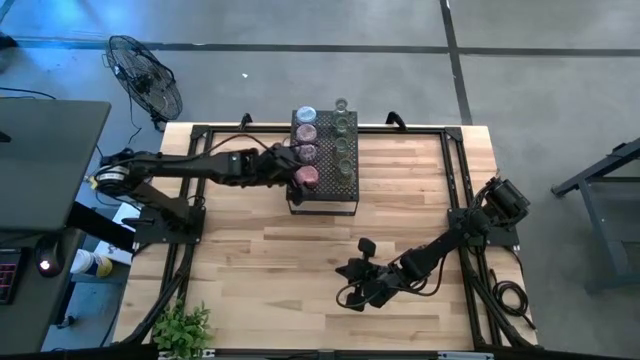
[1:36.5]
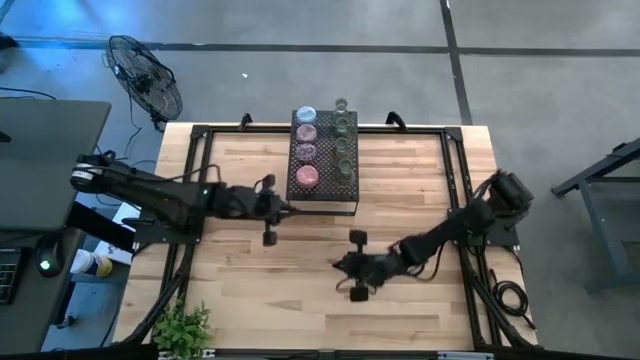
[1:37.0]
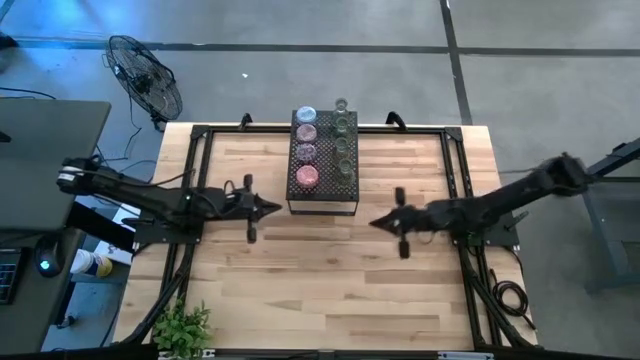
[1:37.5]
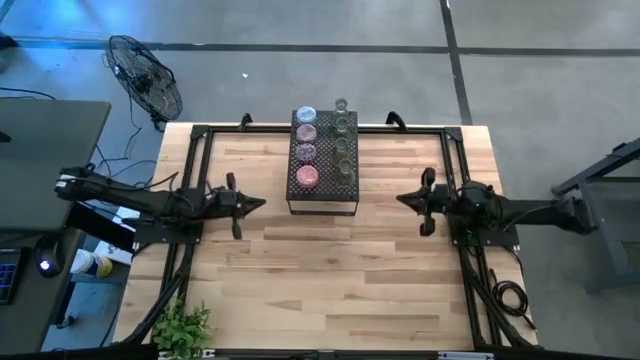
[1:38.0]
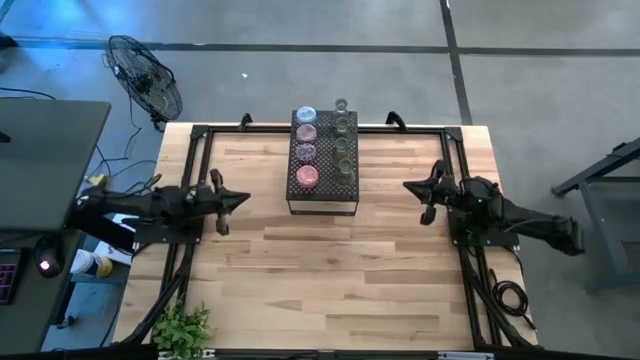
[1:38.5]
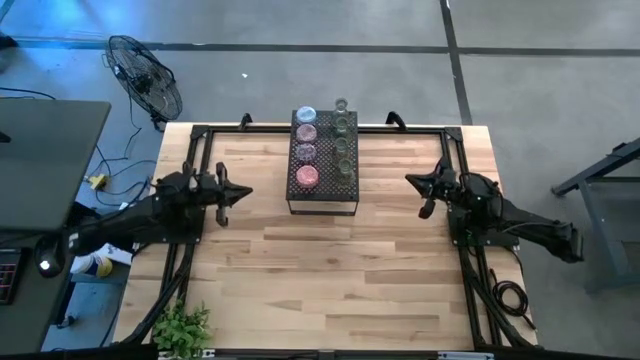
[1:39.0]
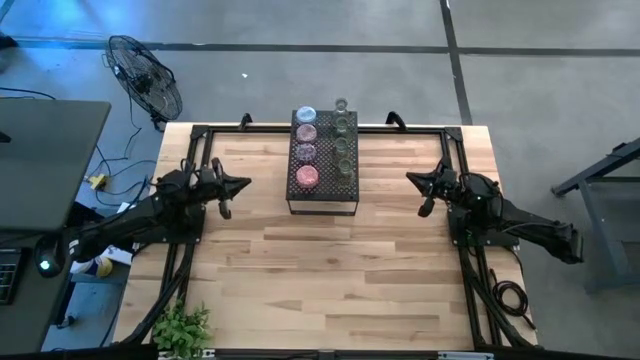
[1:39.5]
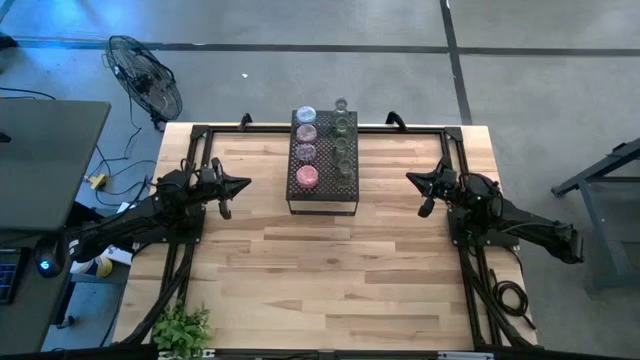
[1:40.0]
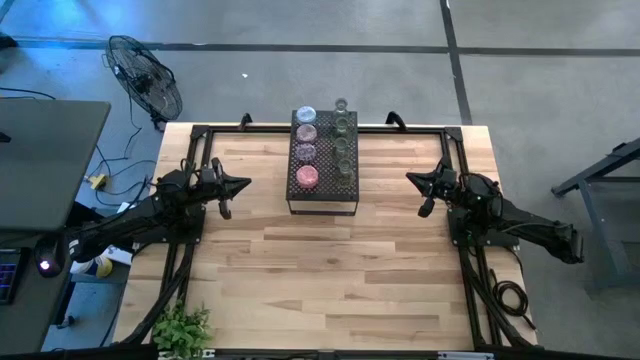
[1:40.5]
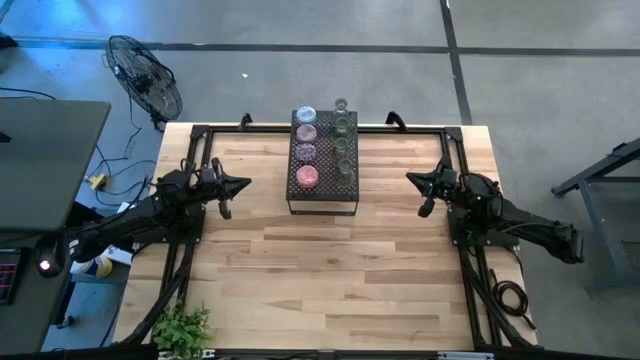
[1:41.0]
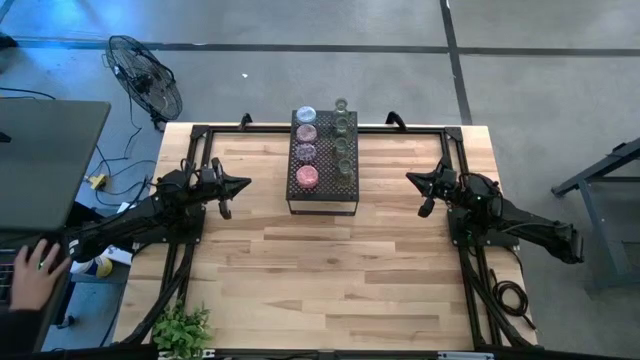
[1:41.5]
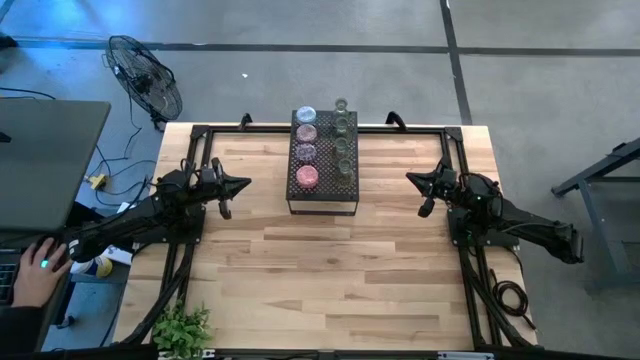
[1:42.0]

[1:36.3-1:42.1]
Task: Pick & Place candle stick holders
Return to Home Position

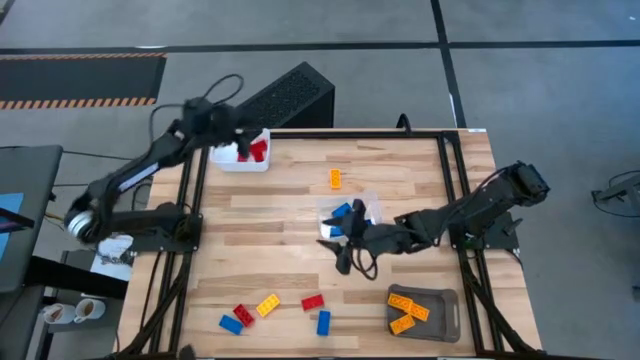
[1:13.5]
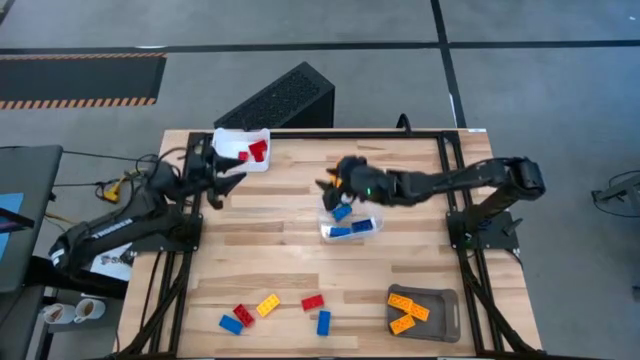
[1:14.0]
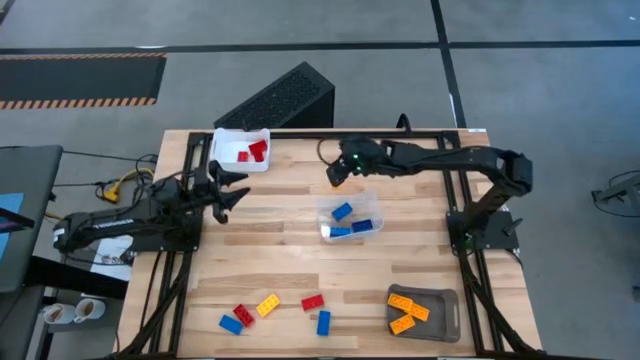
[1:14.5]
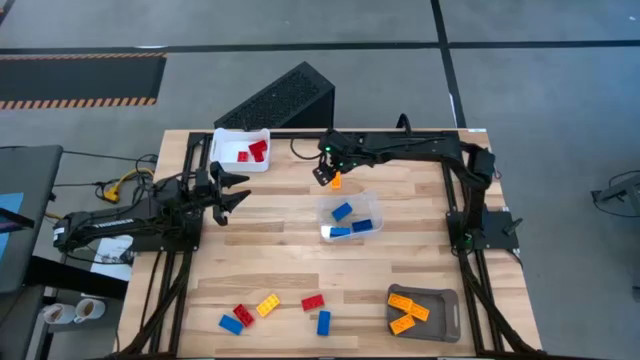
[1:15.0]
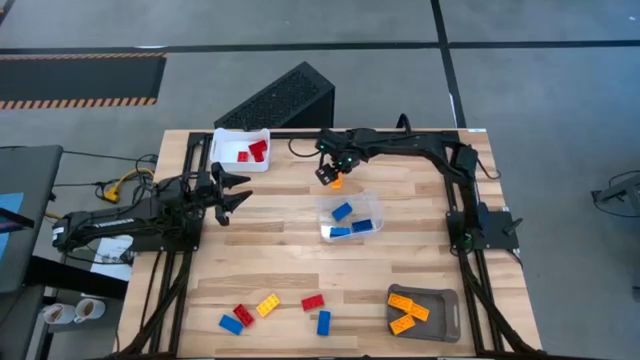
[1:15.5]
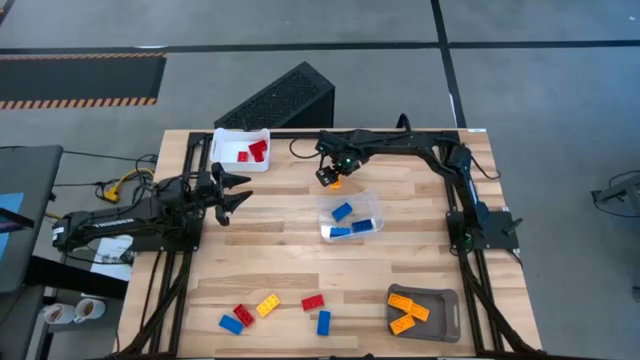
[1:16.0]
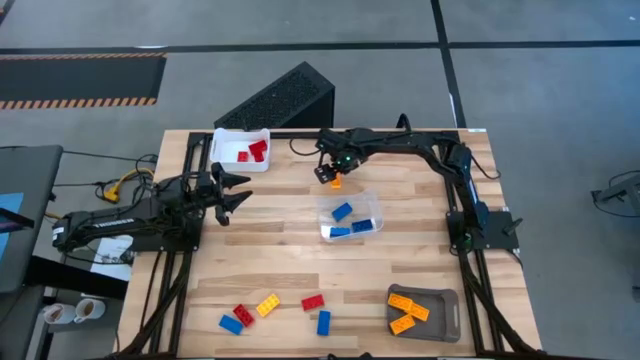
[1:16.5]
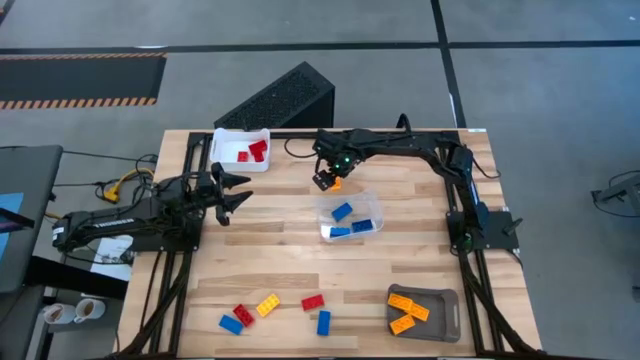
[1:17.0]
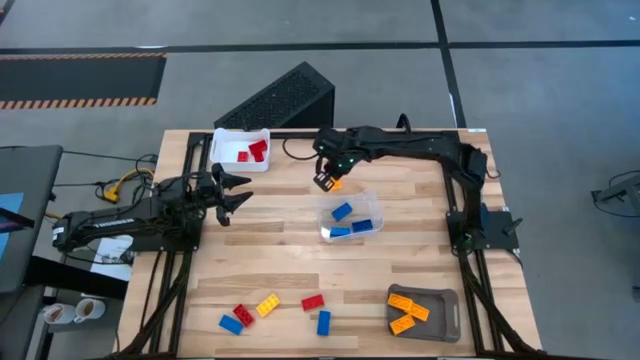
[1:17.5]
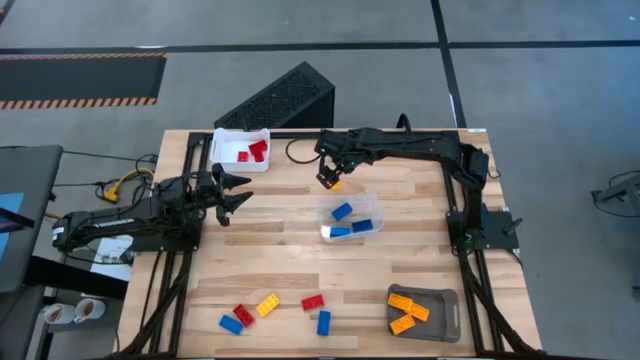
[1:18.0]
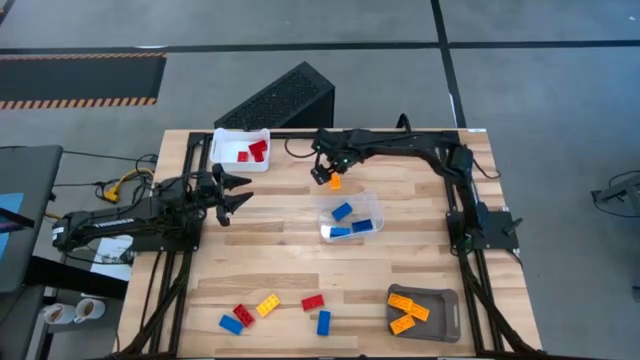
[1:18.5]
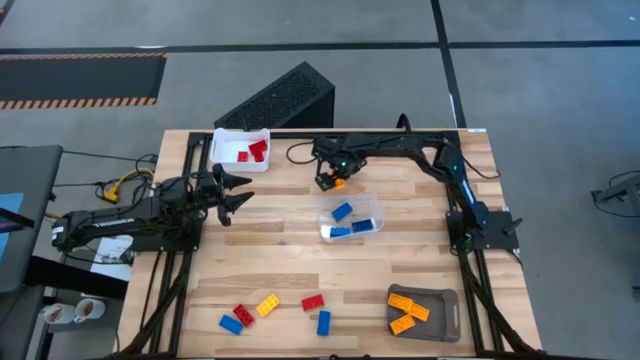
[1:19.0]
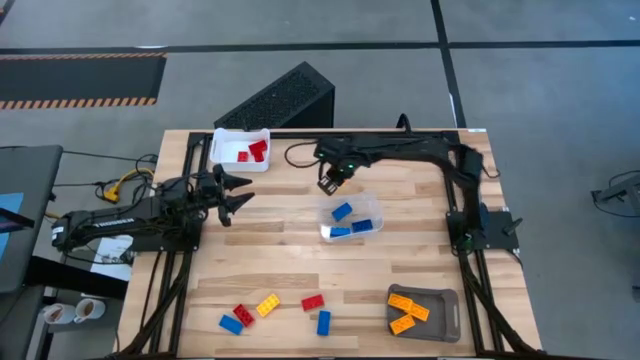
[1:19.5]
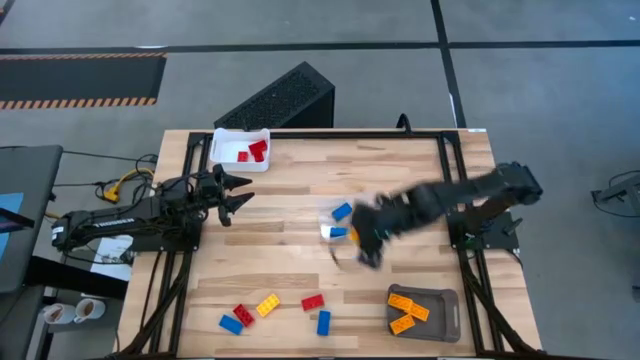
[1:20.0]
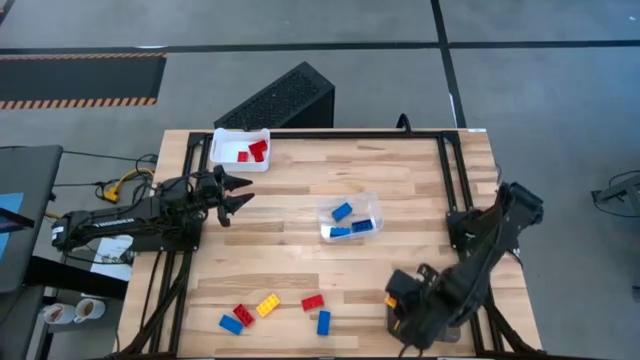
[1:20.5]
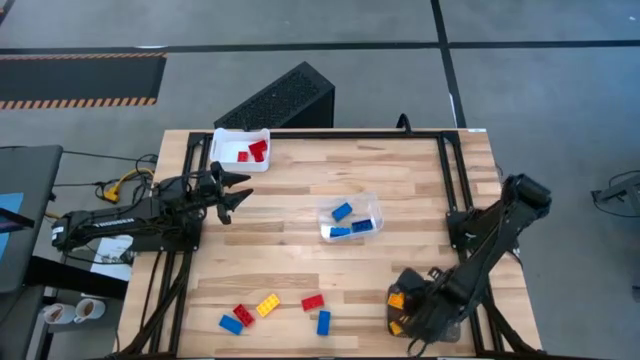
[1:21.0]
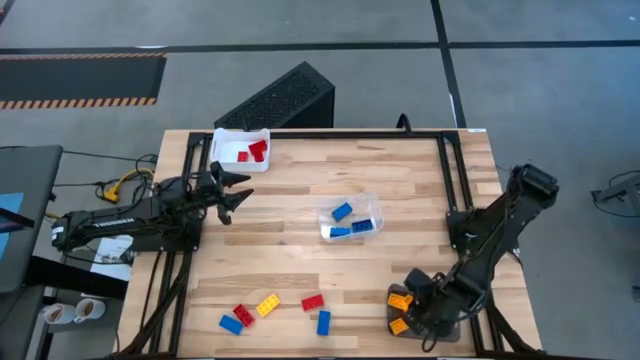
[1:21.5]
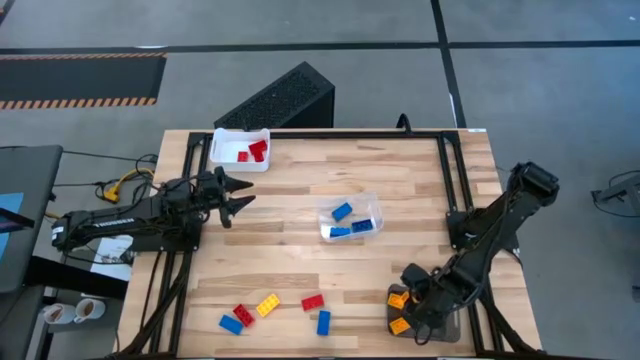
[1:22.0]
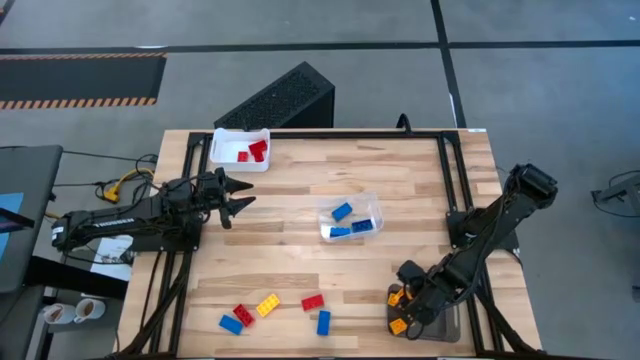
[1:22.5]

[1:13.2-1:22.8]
Task: Sort & place blocks by color
Put the yellow game piece into the black bin

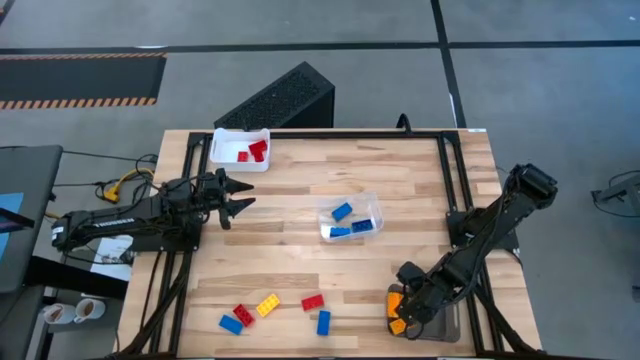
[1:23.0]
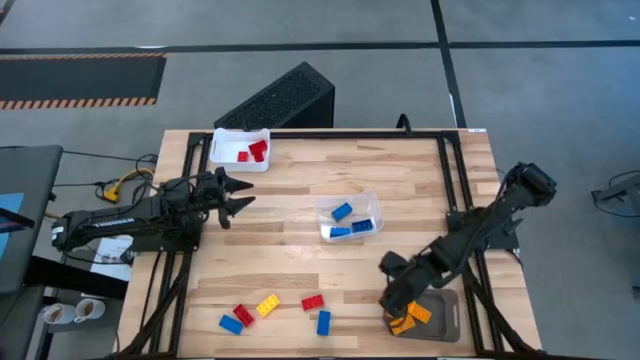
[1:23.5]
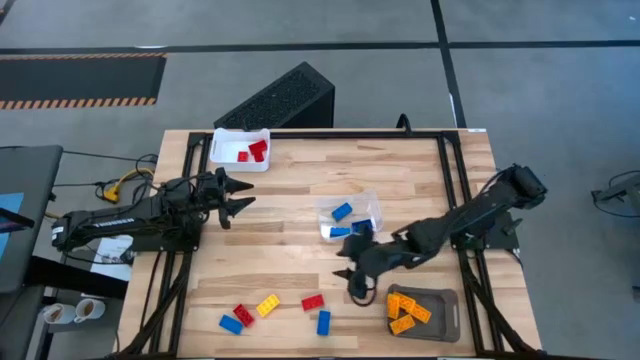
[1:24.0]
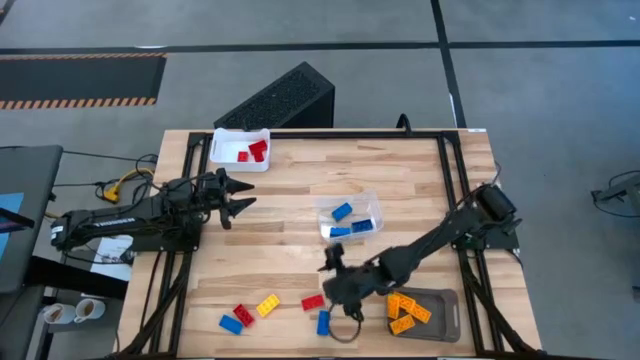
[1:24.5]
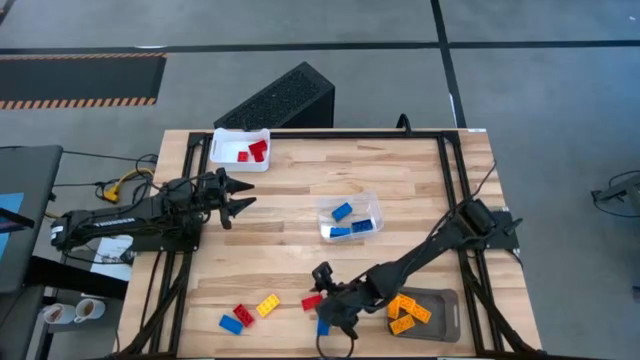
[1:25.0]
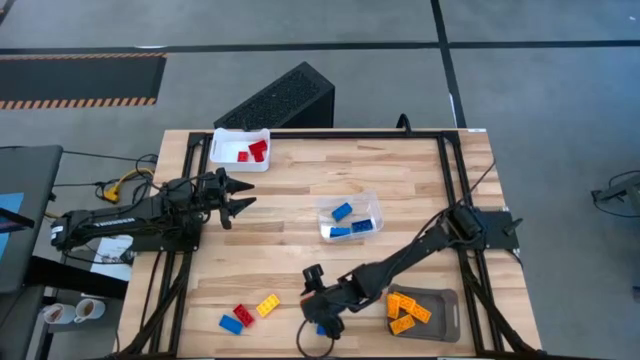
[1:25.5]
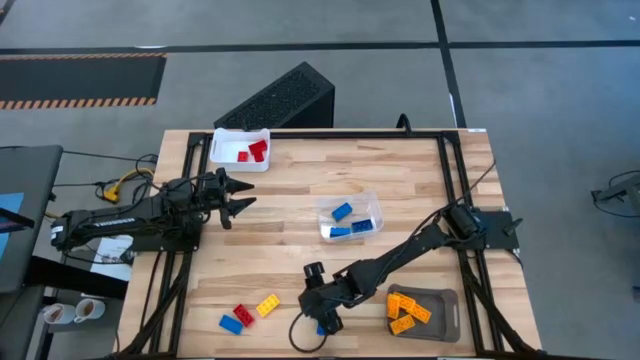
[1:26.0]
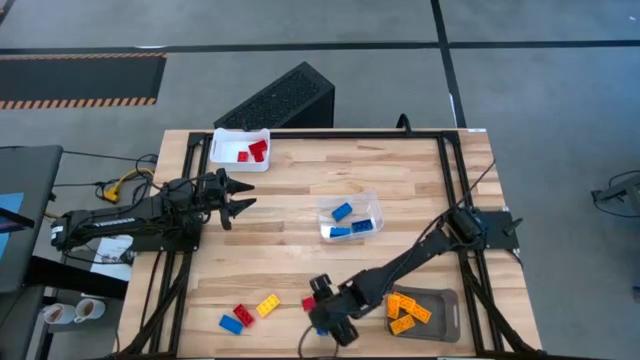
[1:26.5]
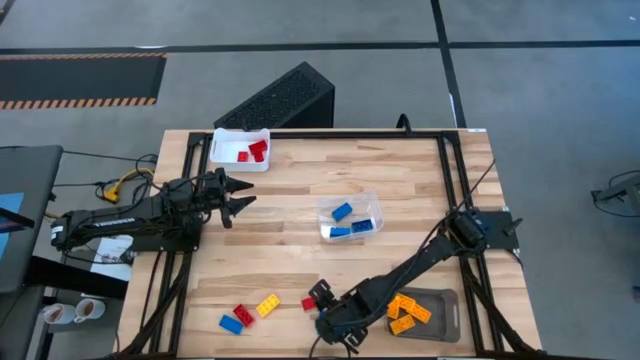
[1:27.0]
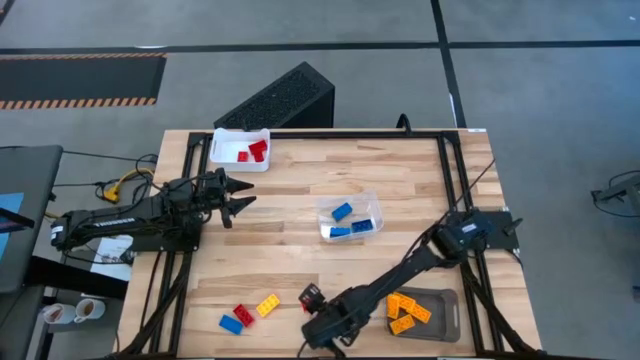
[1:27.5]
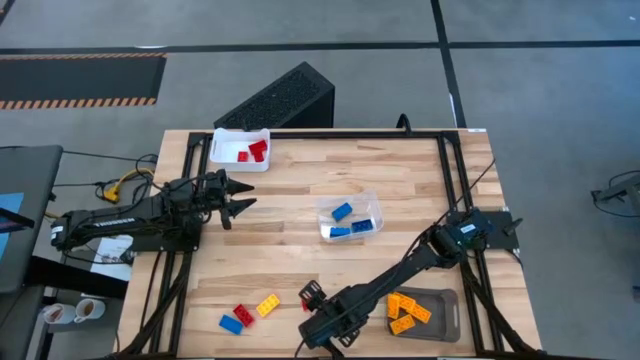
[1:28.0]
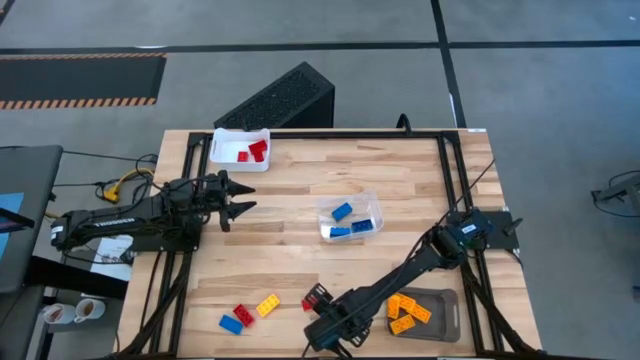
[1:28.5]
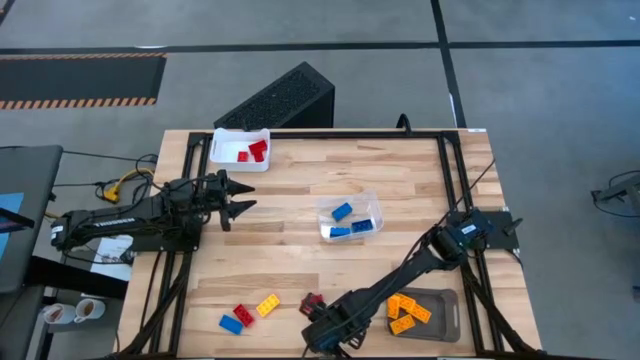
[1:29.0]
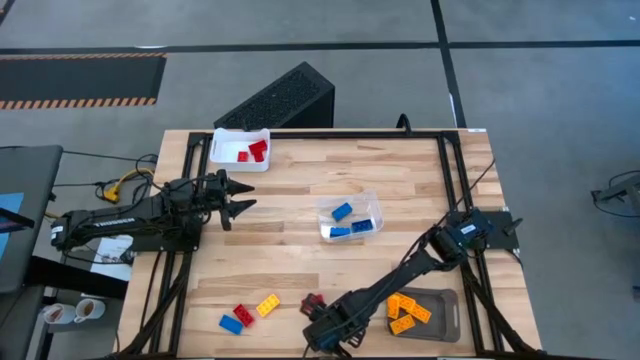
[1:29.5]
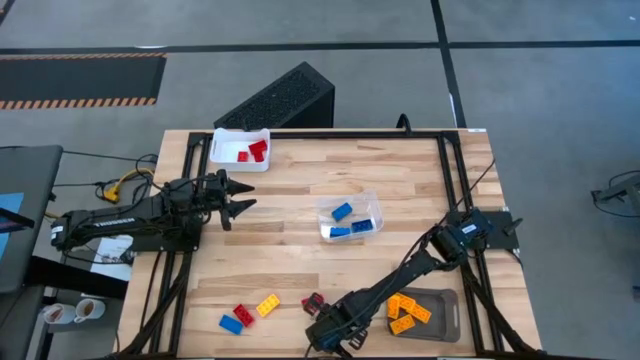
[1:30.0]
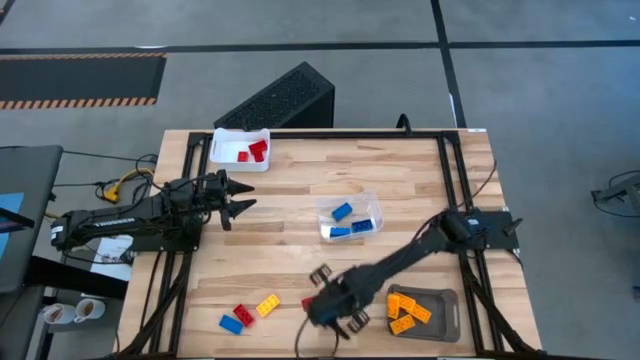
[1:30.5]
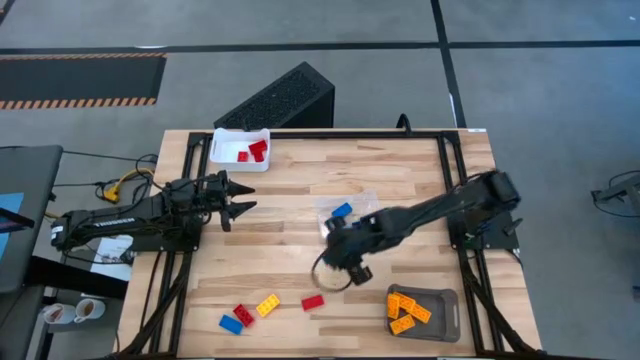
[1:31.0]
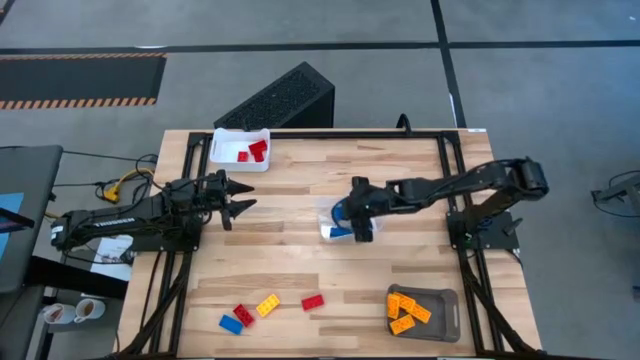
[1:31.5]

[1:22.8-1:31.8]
Put the blue game piece into the transparent bin
